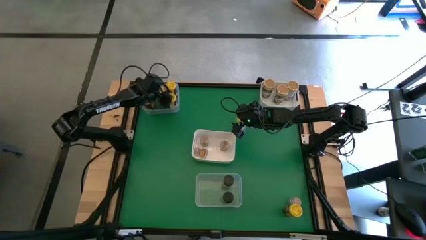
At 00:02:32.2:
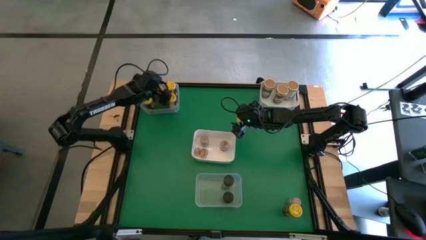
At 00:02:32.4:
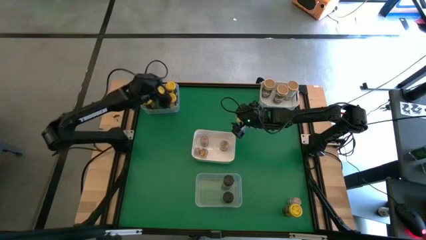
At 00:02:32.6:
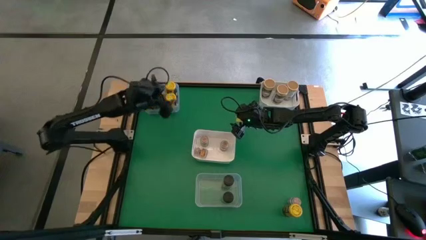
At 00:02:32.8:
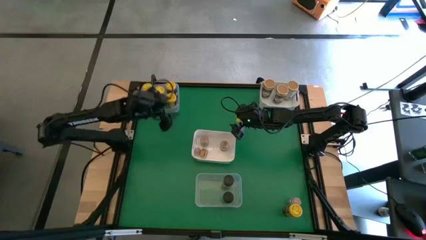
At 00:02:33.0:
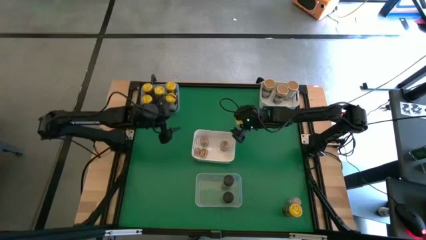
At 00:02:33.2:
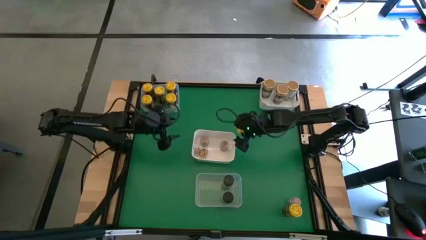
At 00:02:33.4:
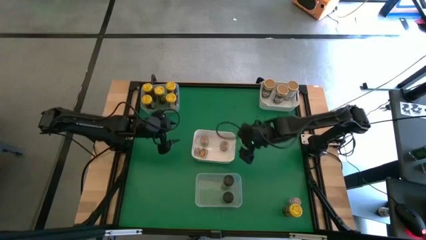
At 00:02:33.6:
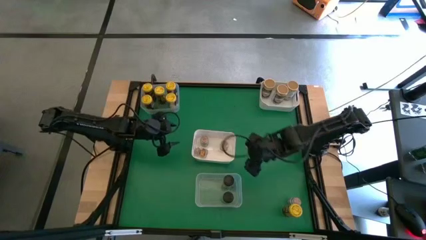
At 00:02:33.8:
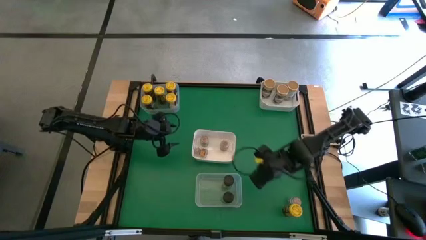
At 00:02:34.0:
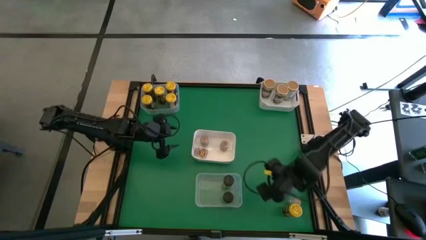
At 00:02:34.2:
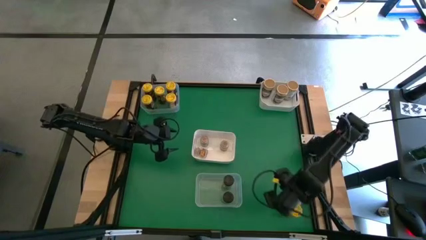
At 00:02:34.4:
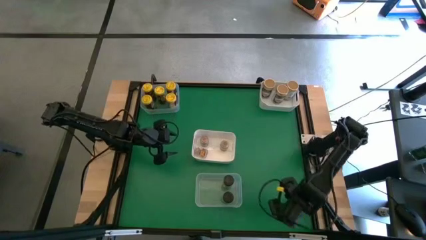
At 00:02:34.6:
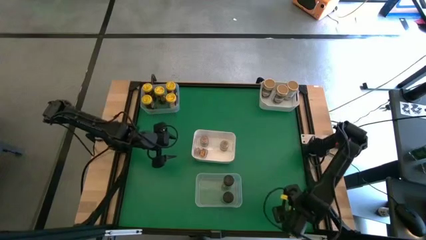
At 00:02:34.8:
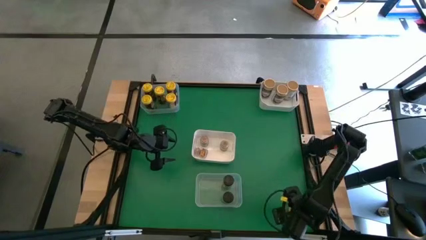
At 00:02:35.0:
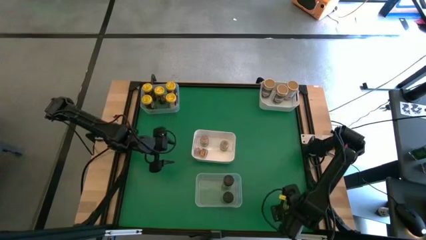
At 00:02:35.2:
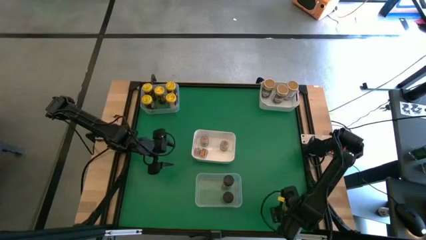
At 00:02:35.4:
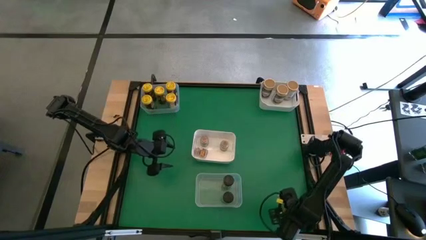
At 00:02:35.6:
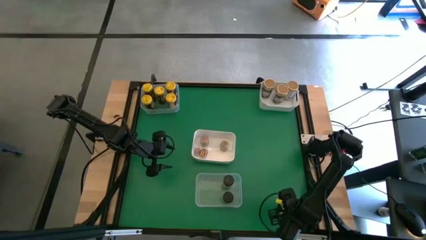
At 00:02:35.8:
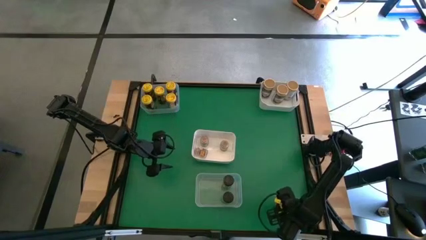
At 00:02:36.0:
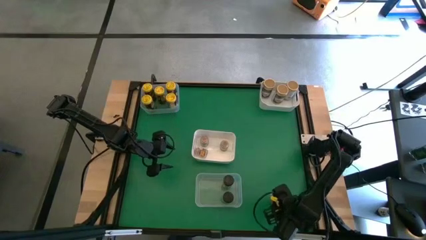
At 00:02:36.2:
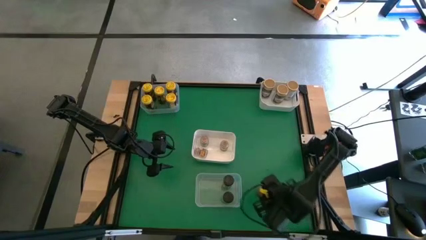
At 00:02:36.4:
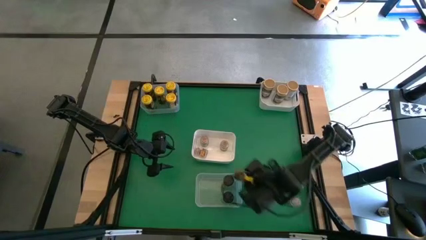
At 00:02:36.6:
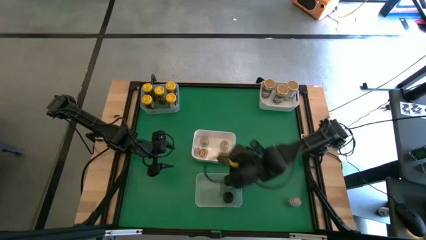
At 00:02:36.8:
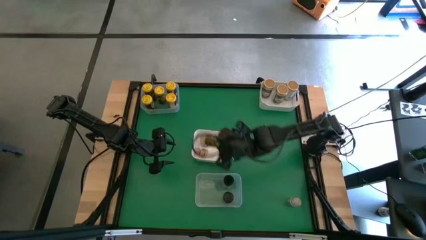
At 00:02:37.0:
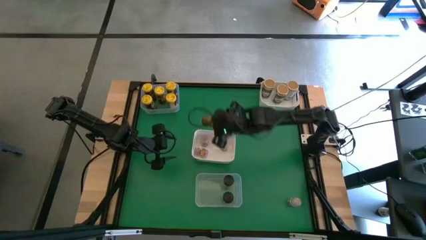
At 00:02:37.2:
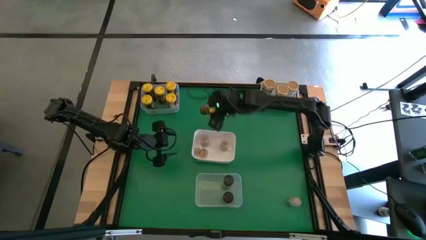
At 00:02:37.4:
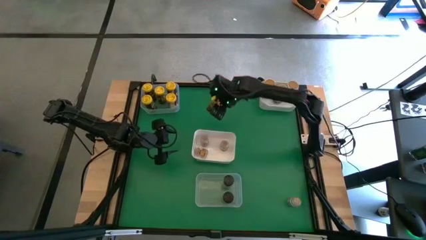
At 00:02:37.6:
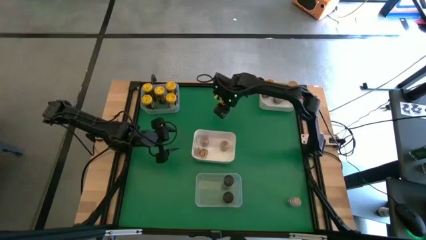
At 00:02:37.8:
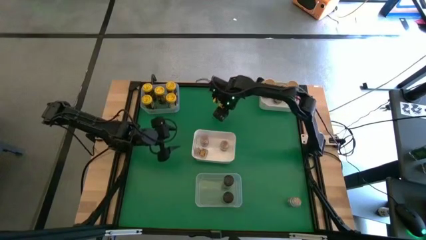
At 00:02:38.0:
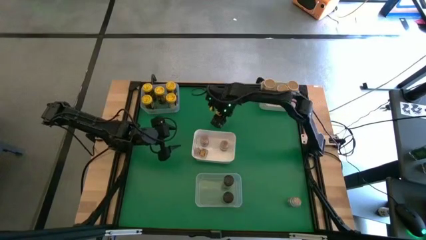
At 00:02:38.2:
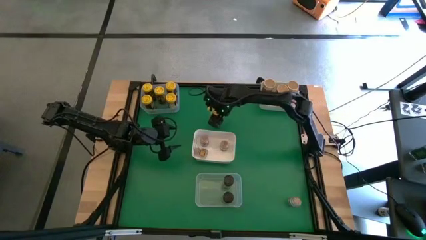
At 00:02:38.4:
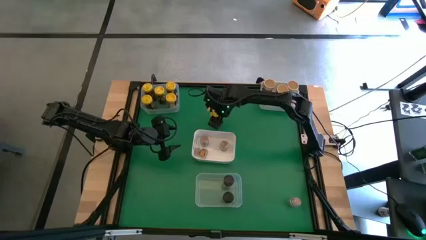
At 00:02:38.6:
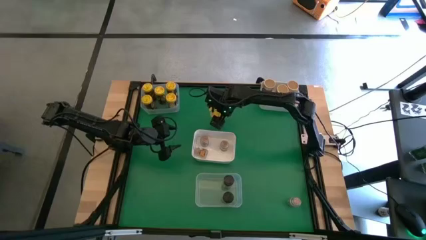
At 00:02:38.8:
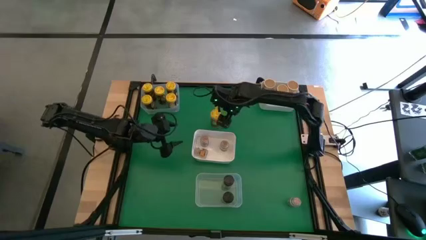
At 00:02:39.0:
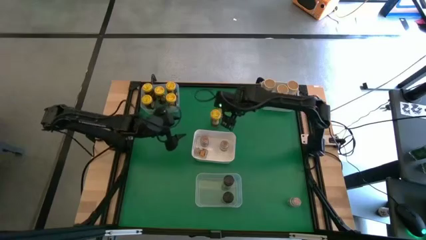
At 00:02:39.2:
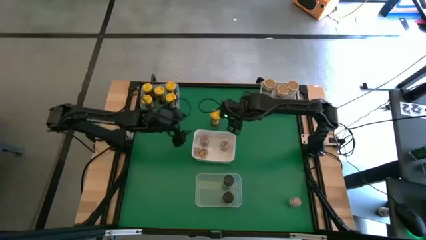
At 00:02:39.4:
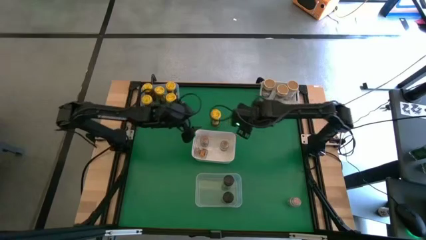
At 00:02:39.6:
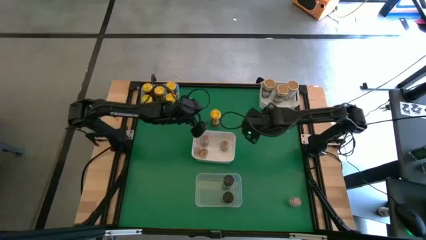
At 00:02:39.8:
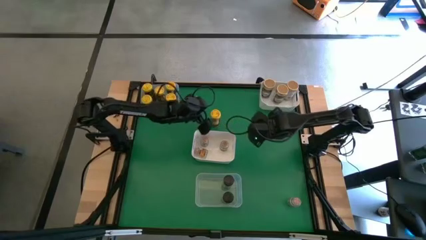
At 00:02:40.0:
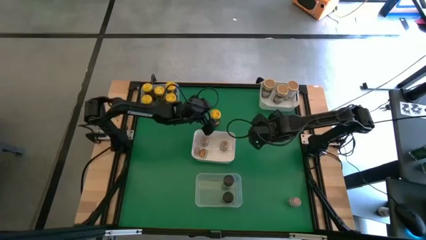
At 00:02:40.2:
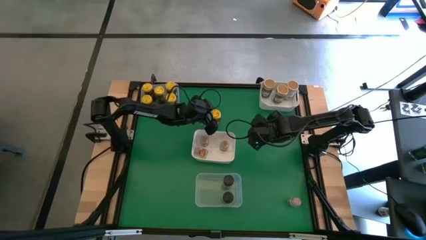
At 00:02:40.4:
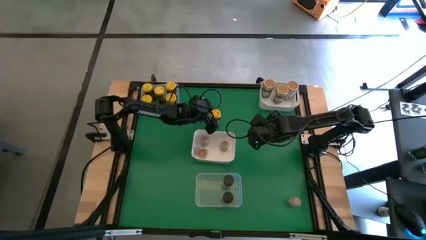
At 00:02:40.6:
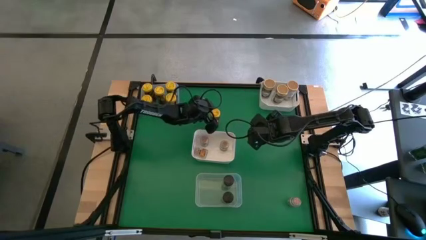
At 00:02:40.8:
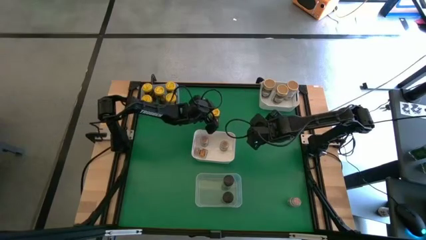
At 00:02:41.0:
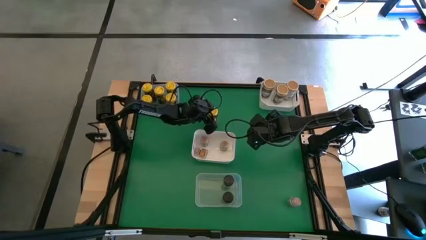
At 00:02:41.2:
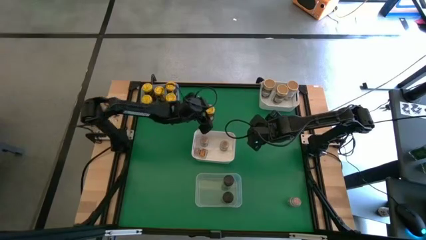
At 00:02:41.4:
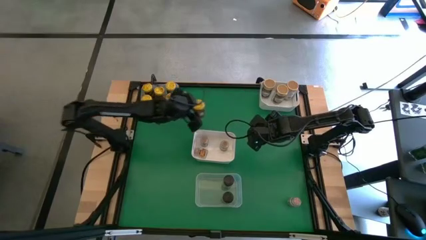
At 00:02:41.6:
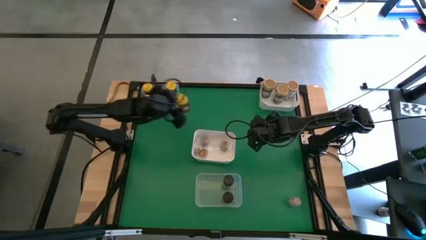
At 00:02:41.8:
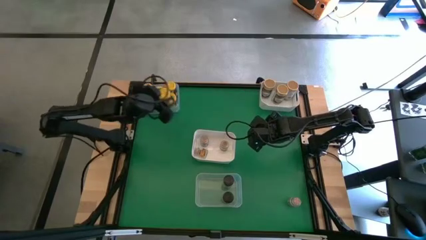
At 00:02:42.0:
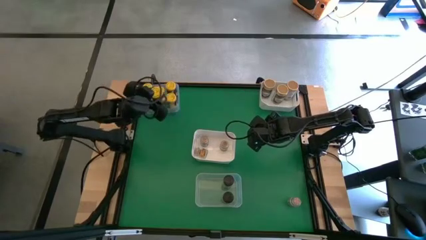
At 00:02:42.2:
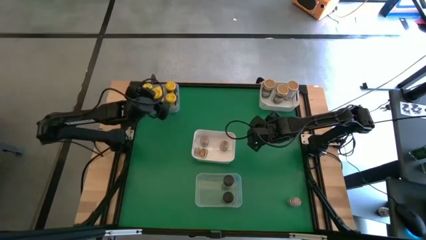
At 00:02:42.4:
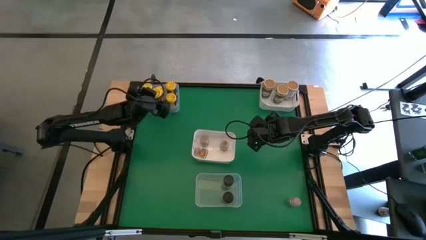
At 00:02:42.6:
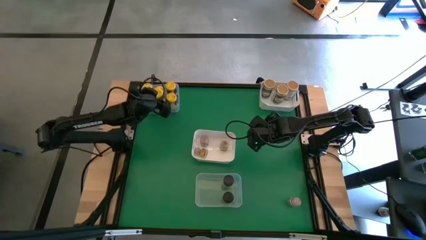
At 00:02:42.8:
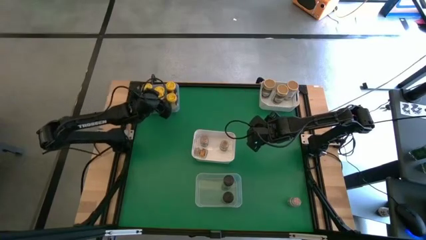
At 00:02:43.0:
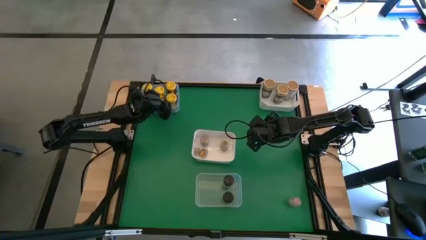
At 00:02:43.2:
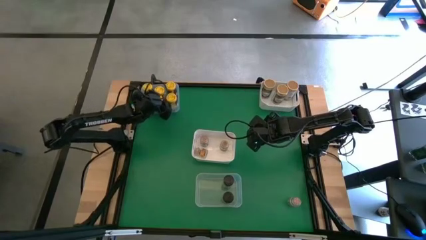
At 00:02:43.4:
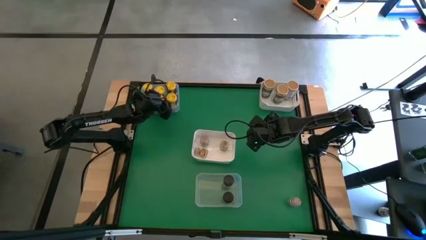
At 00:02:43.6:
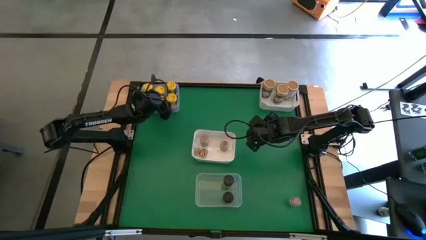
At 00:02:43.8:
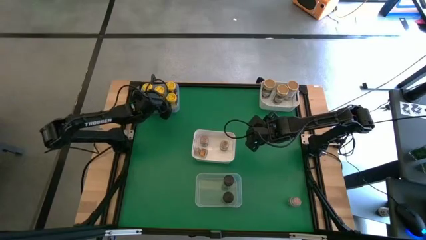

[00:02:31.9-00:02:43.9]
Task: Sort spices by type
Put the yellow seasoning bottle into the top transparent bin

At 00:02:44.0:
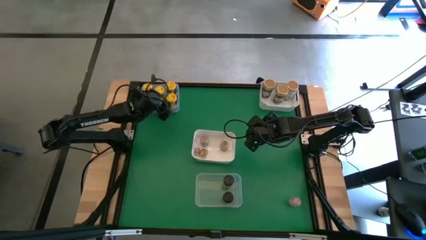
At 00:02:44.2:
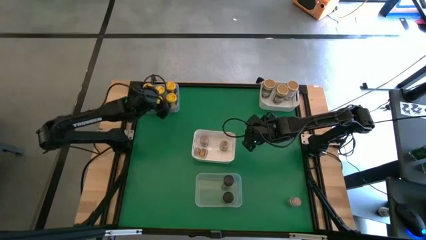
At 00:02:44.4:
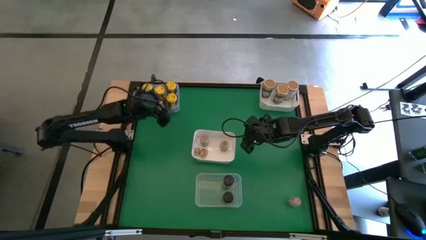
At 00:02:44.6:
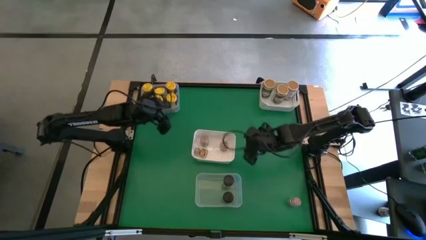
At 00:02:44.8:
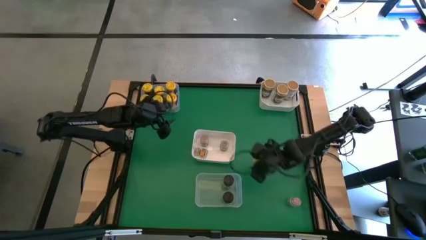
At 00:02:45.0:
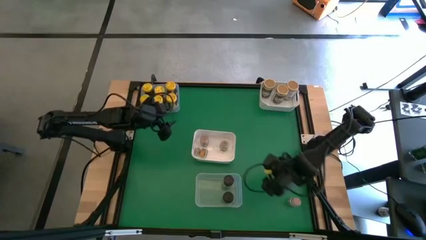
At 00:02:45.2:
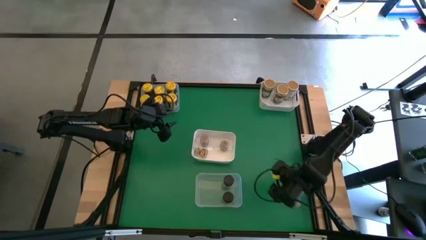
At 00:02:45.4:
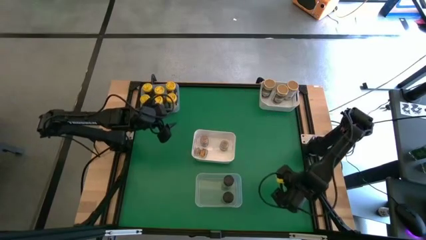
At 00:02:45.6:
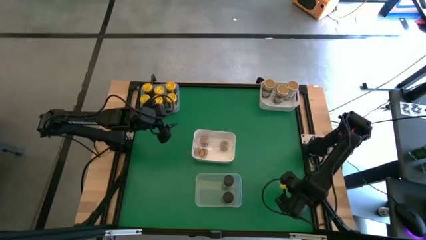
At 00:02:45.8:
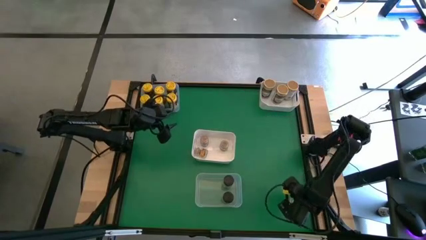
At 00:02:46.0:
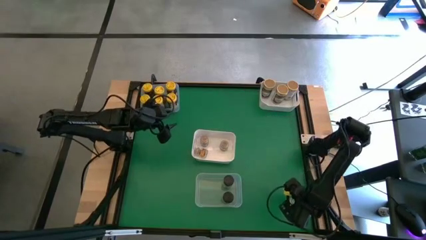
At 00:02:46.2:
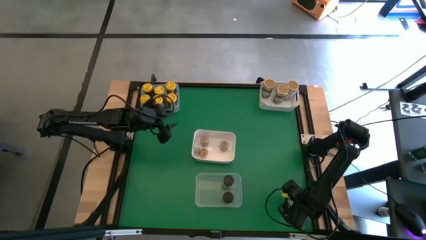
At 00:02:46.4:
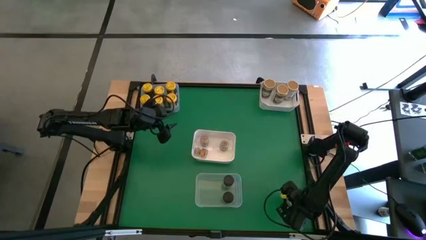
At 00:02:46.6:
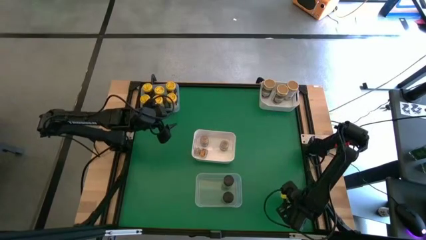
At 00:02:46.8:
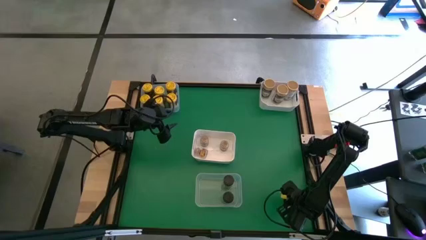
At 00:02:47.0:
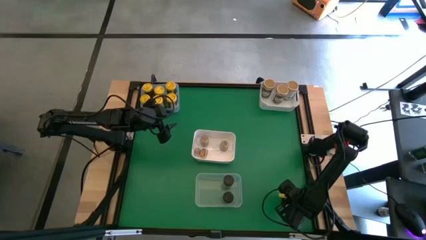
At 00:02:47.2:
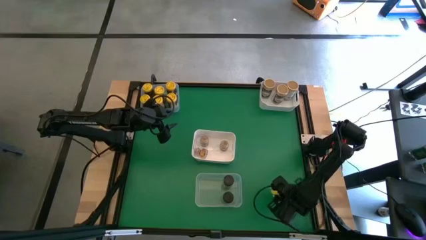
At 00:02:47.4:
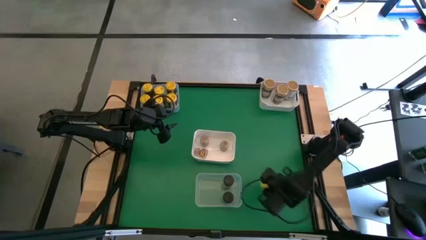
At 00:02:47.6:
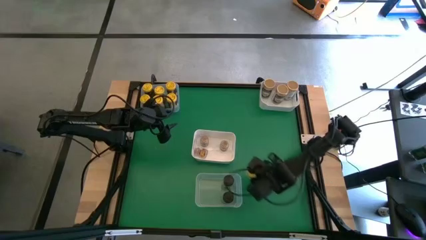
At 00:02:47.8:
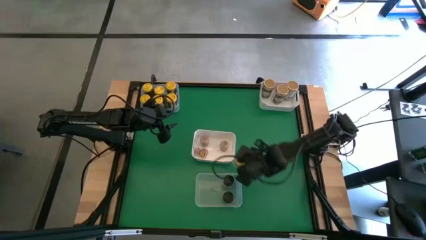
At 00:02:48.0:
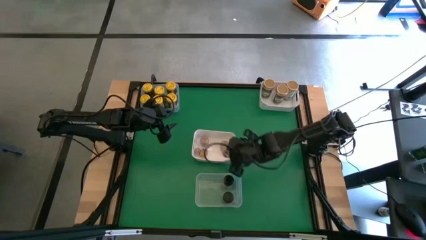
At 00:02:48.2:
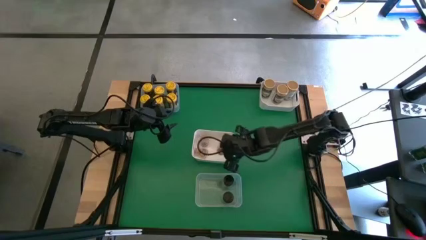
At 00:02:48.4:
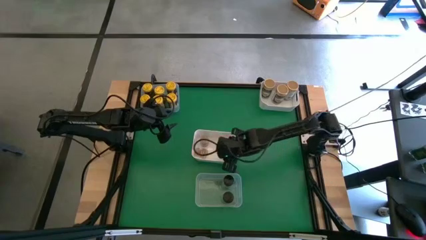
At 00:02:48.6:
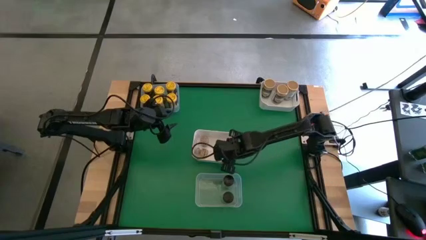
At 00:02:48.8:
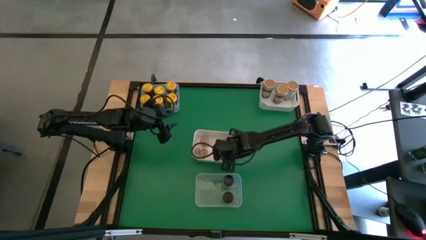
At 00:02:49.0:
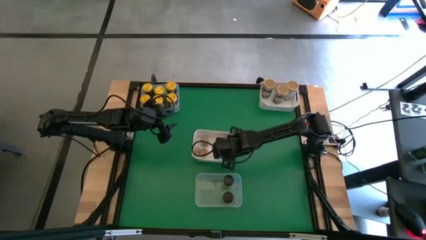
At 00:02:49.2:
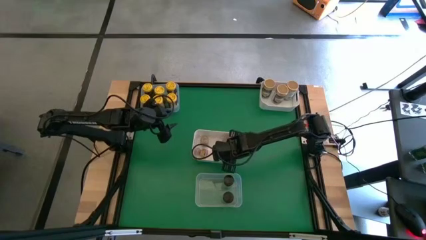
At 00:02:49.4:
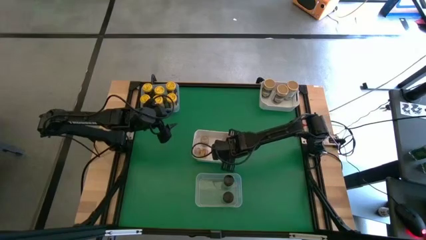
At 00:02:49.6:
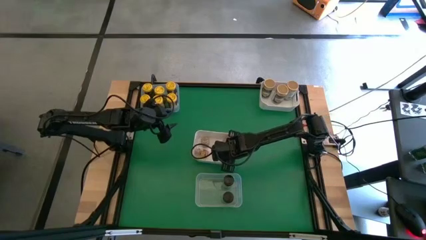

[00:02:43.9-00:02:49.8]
Put the brown seasoning bottle into the bottom white bin
